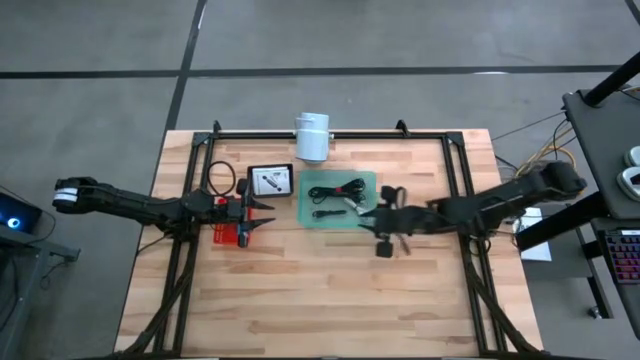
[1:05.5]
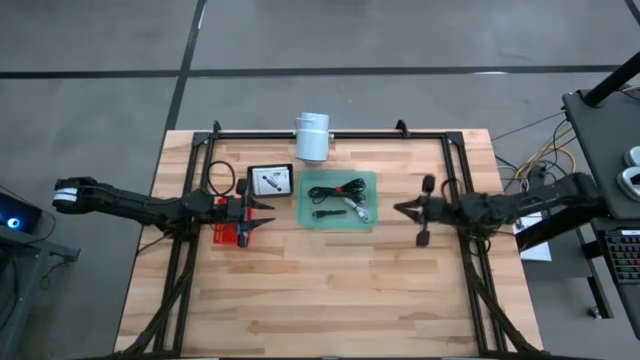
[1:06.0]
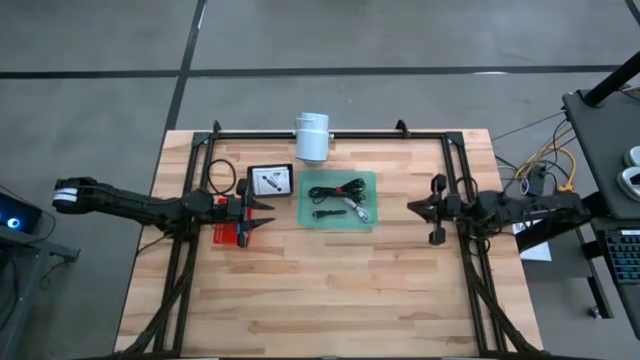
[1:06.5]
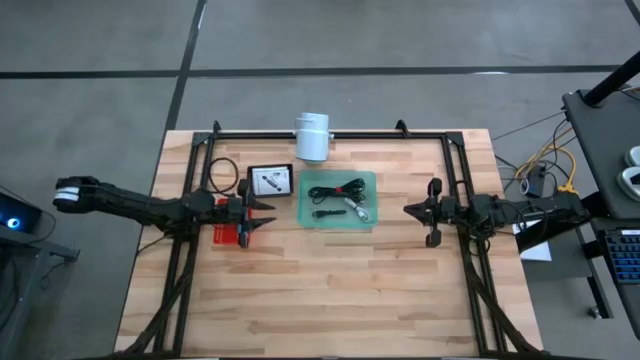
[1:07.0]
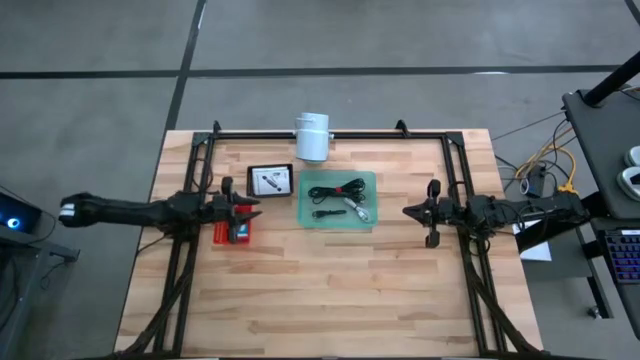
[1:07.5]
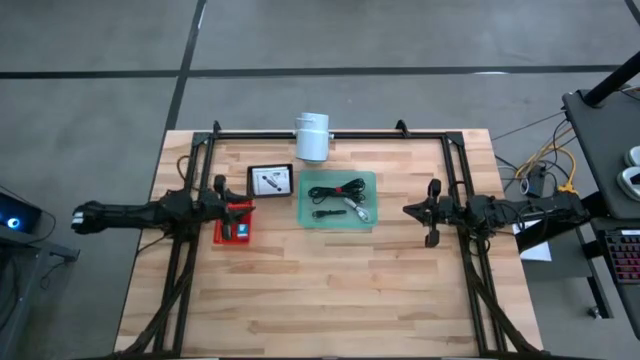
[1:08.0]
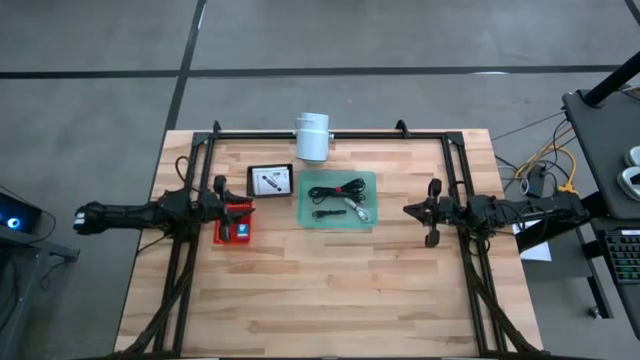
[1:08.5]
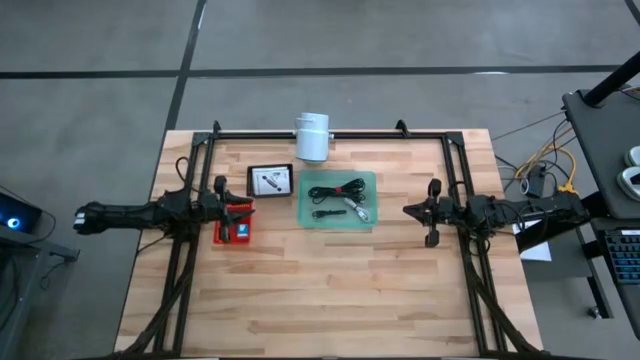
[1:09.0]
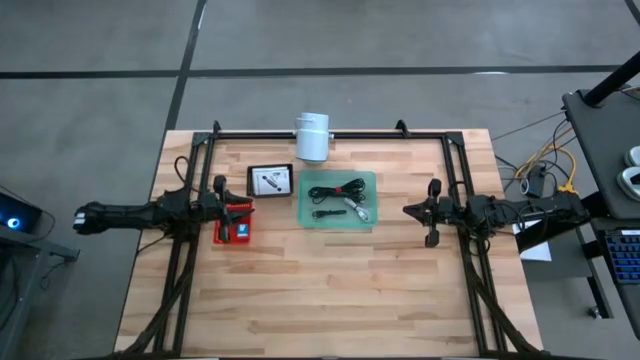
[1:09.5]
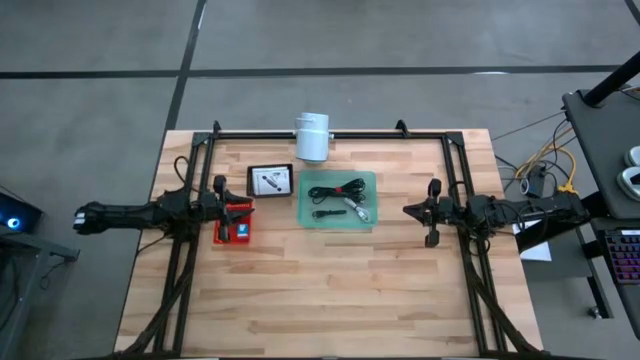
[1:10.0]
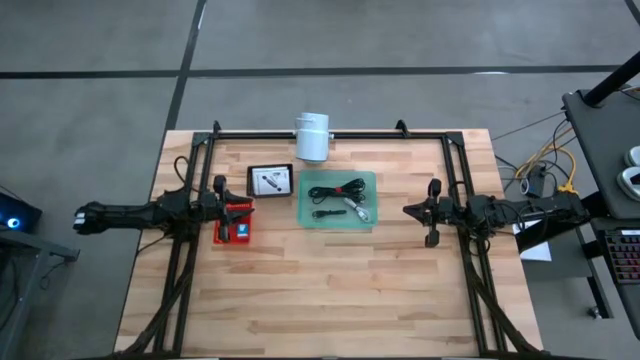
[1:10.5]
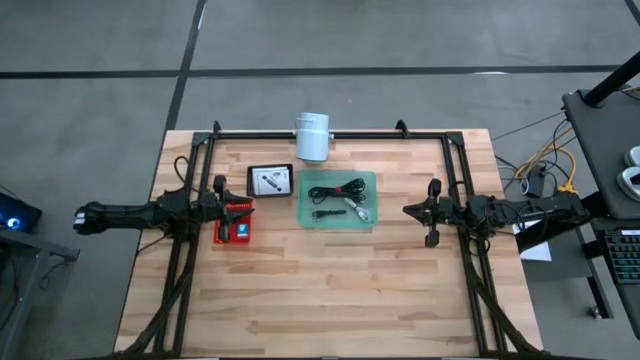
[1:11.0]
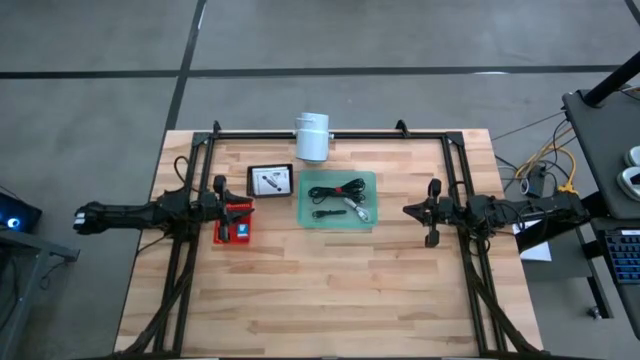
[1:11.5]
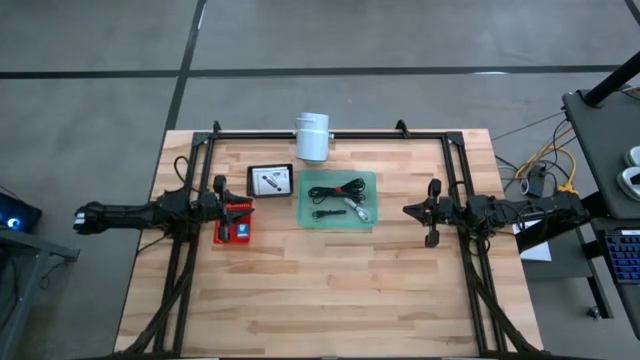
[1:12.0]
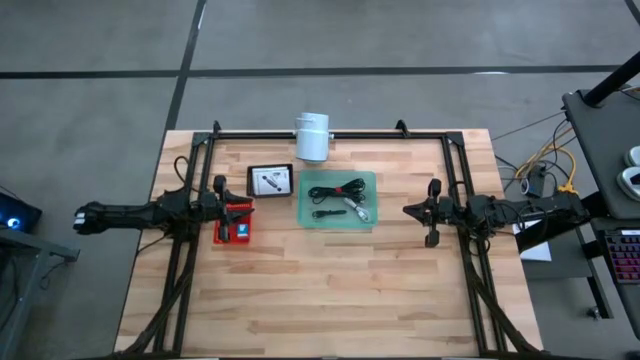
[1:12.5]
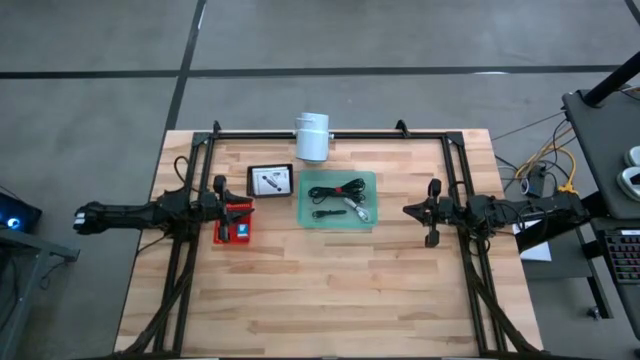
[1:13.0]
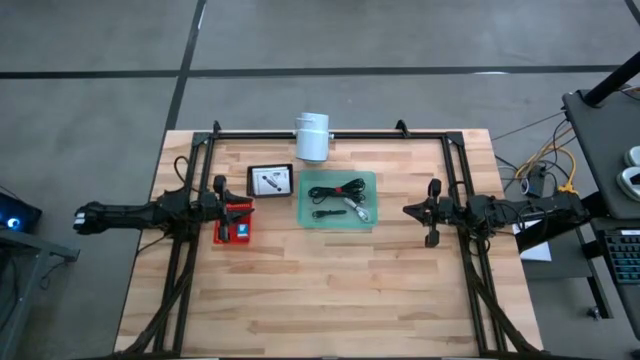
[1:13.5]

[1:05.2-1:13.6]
Task: Pick and place items into bin
Return to Home Position

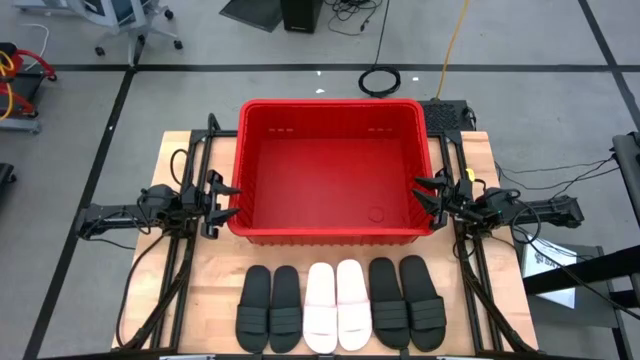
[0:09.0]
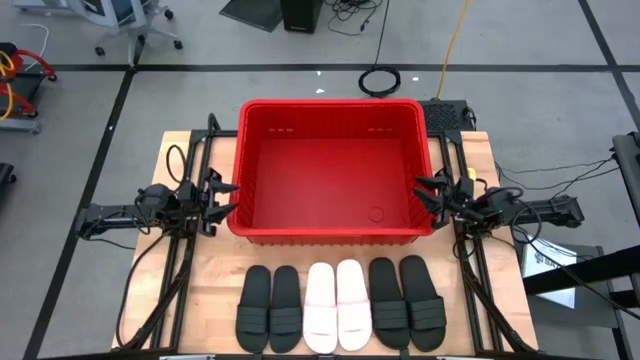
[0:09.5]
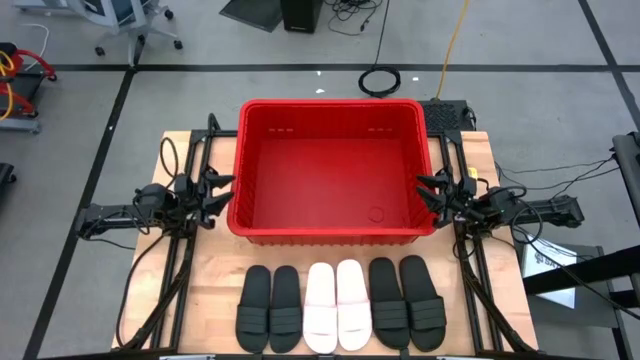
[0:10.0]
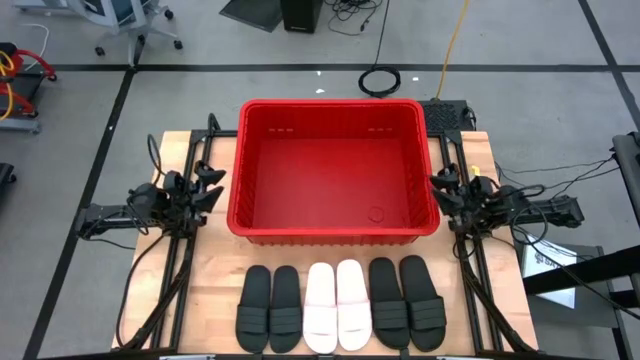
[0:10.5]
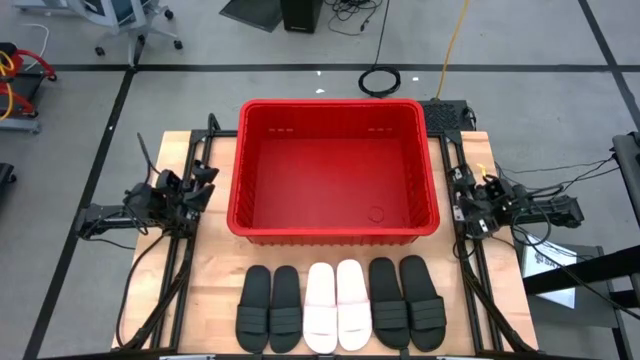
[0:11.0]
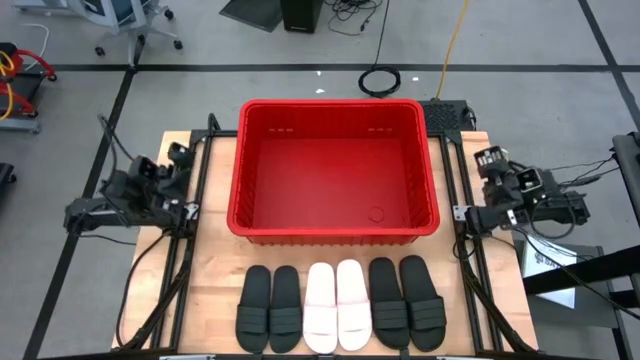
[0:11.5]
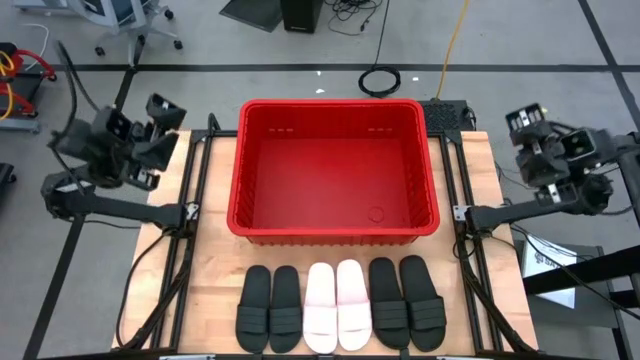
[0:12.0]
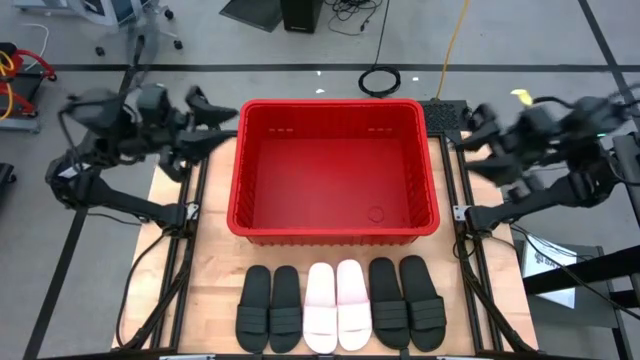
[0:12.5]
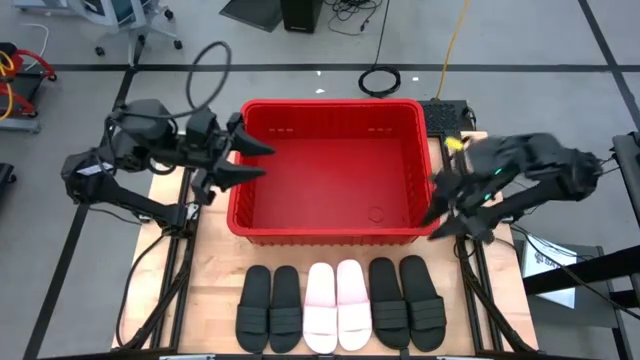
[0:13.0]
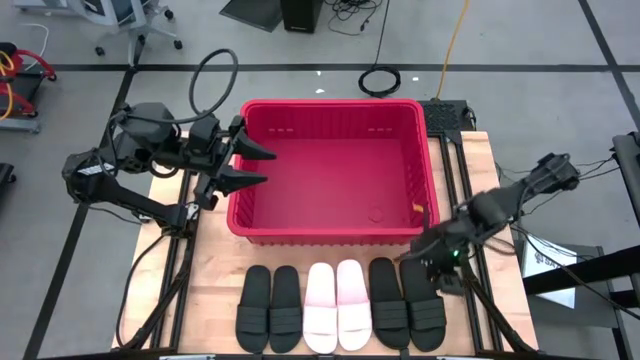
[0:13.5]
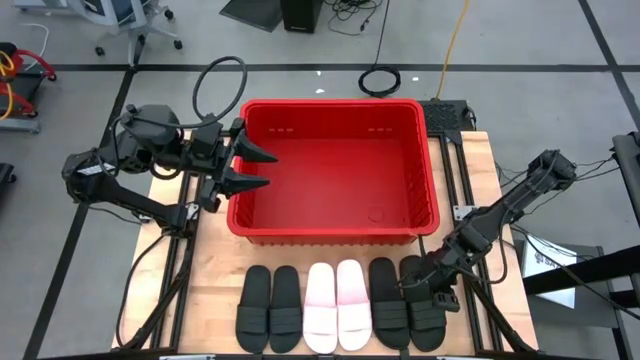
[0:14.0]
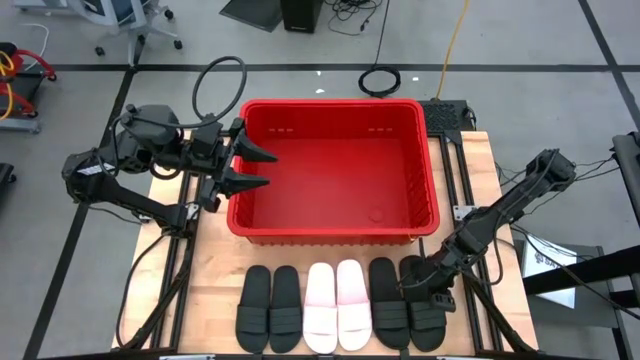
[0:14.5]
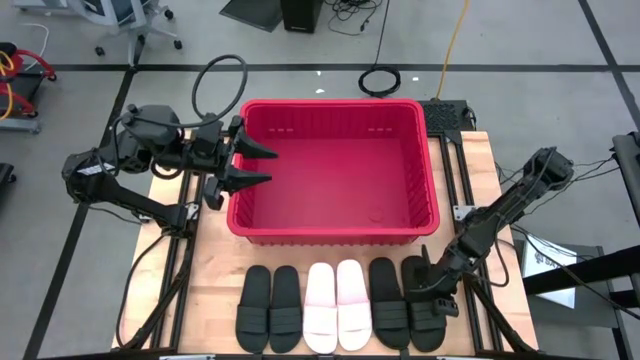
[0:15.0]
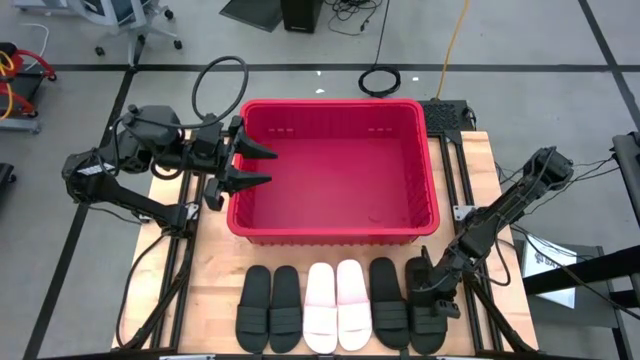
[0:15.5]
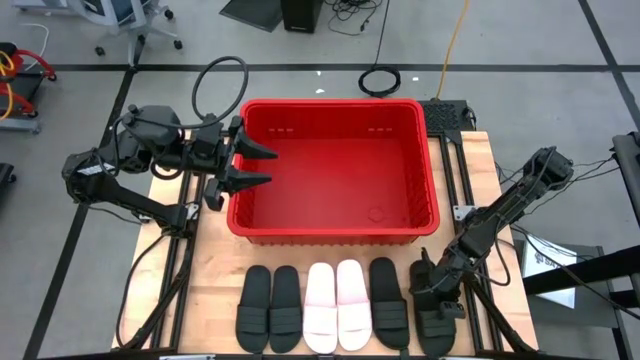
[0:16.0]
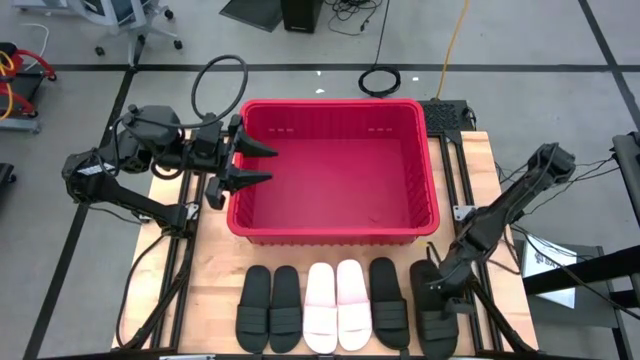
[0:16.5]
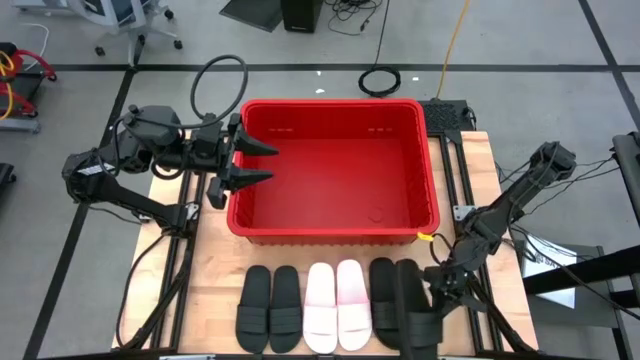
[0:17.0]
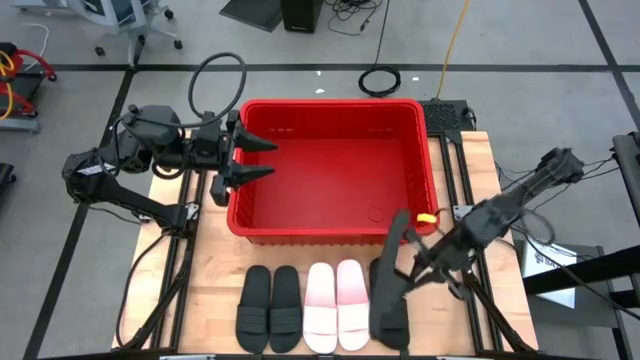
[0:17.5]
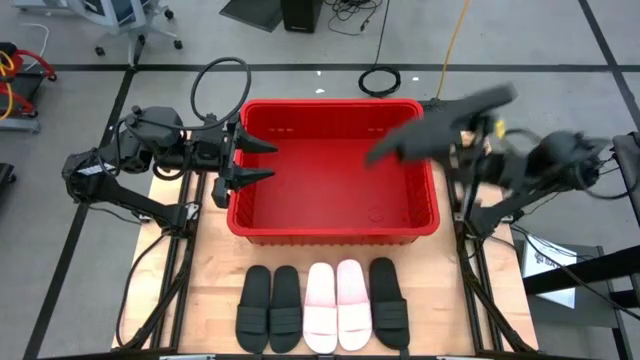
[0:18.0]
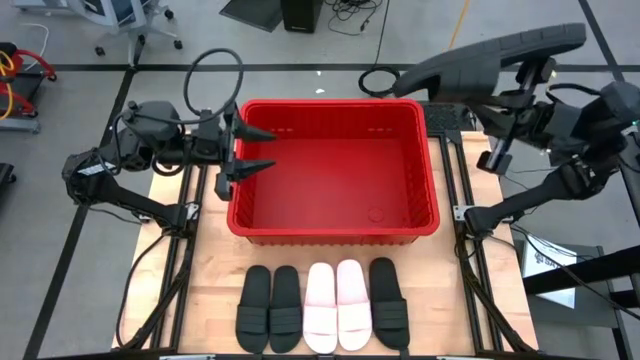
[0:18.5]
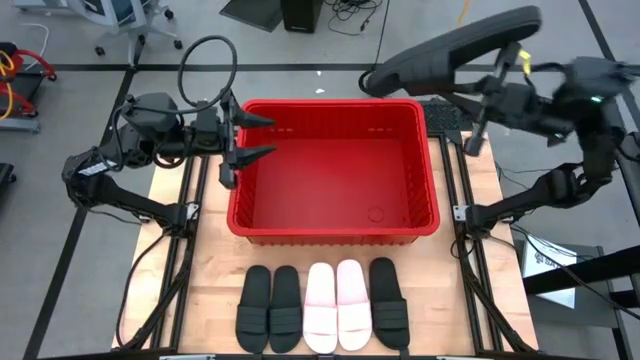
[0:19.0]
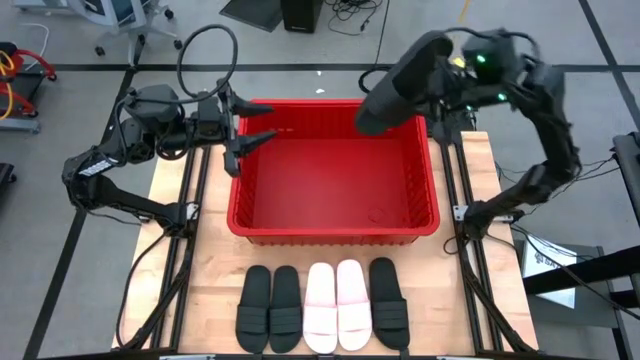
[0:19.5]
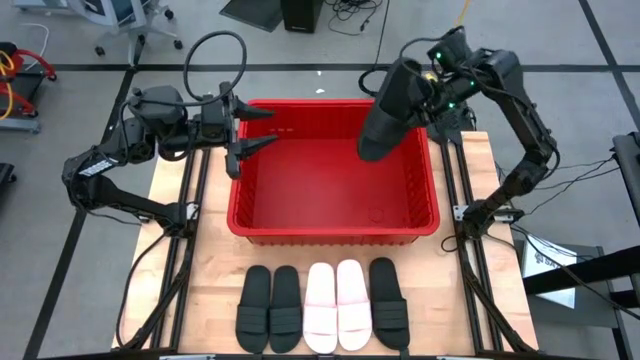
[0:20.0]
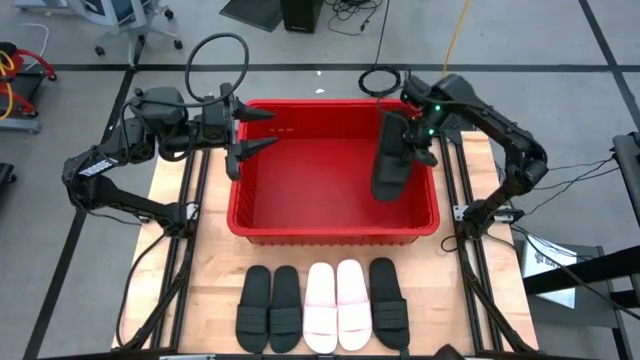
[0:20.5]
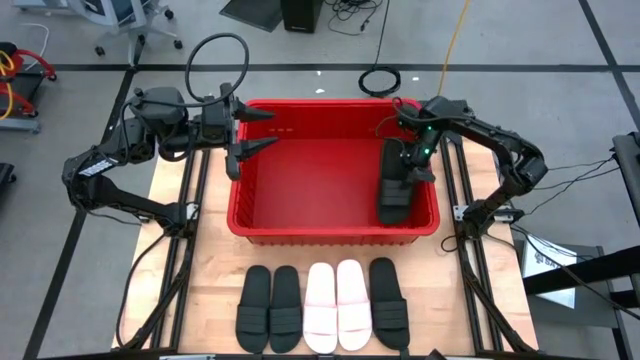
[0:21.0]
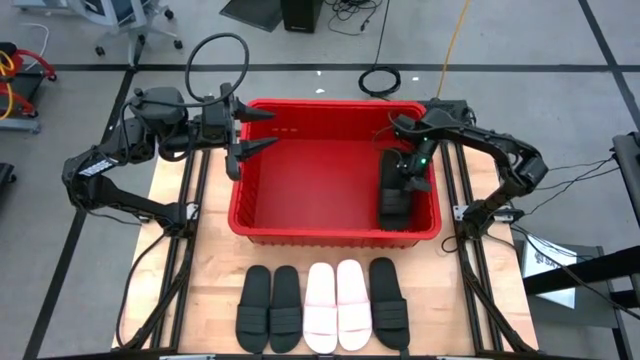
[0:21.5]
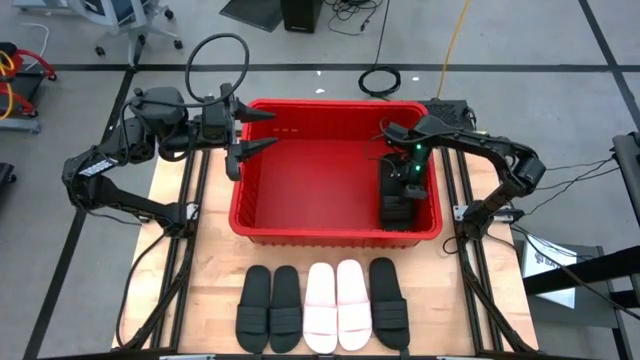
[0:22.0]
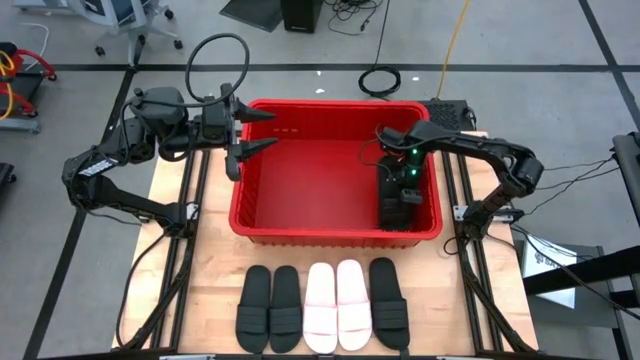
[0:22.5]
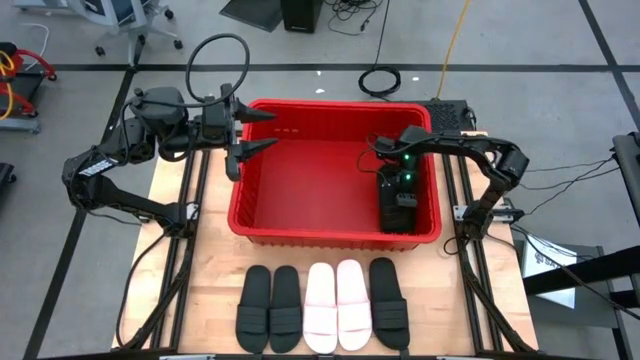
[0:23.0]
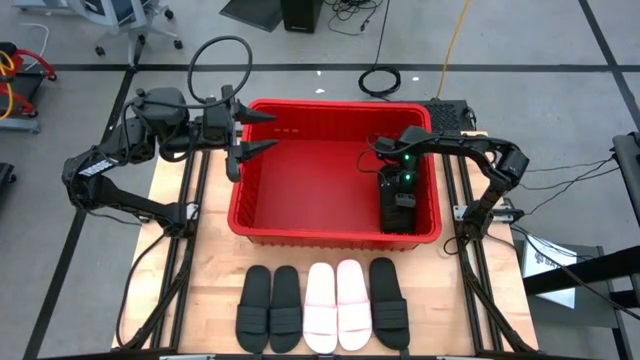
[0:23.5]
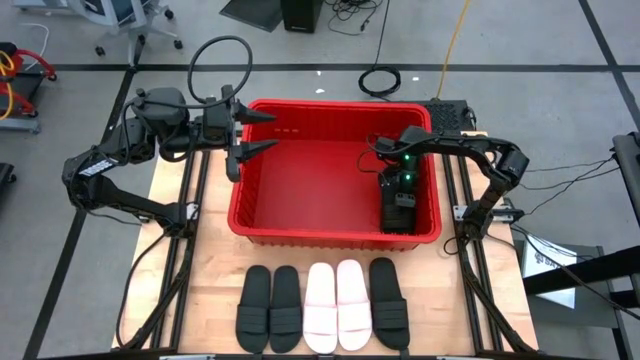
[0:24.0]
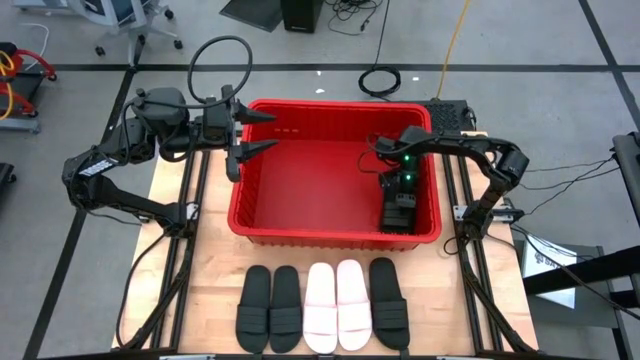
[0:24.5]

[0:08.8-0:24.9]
Task: Pick and place slides into bin
Put the black slide into the red bin
